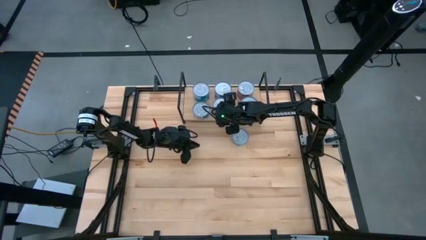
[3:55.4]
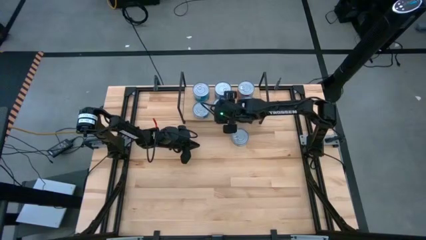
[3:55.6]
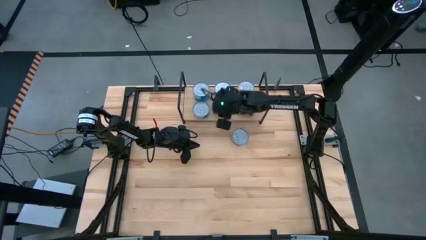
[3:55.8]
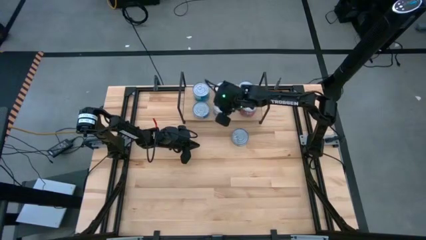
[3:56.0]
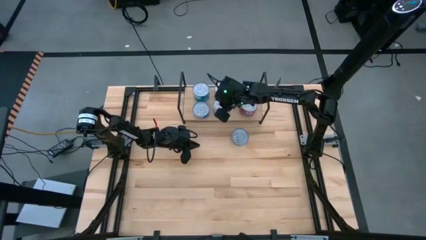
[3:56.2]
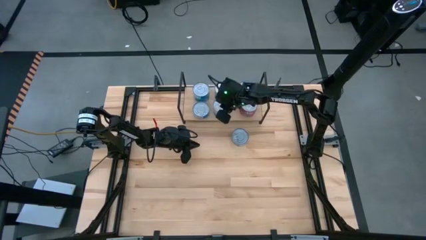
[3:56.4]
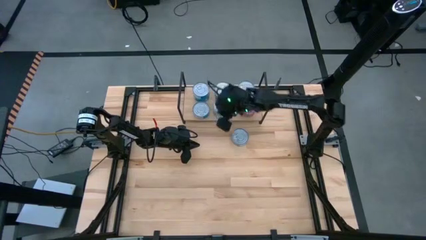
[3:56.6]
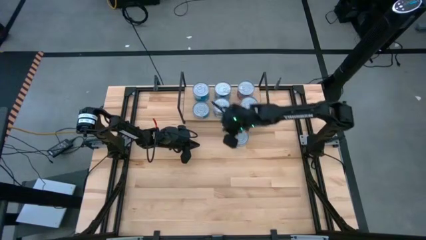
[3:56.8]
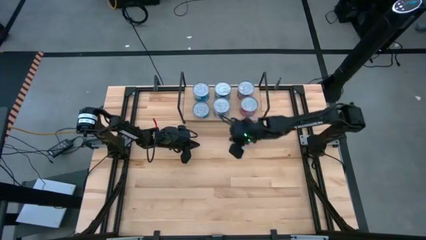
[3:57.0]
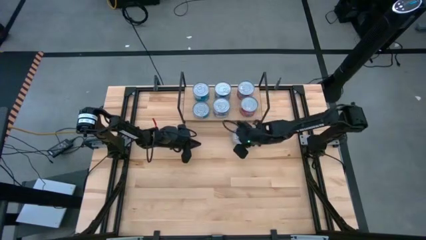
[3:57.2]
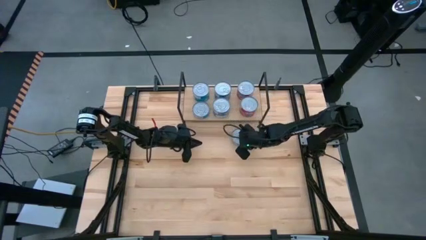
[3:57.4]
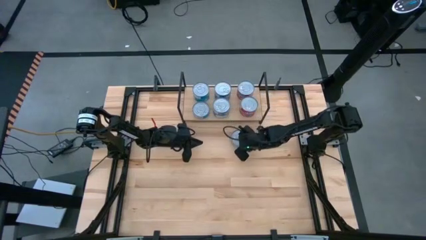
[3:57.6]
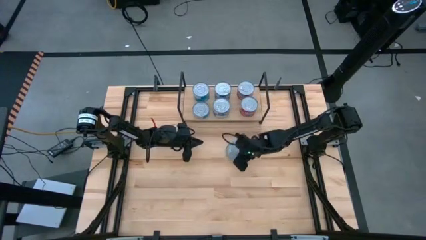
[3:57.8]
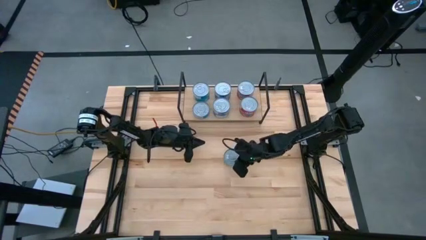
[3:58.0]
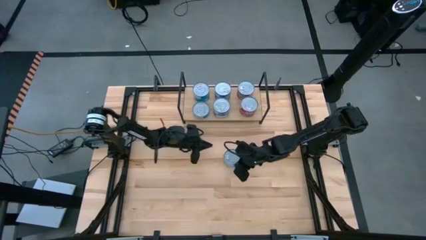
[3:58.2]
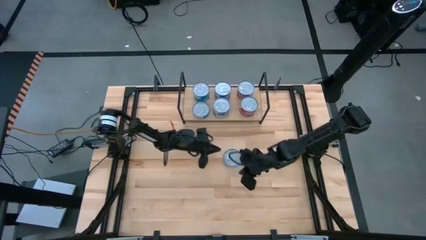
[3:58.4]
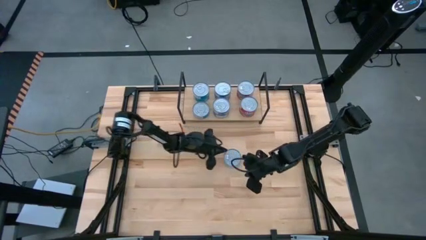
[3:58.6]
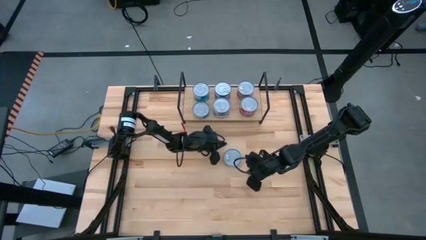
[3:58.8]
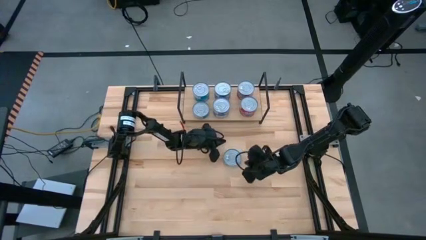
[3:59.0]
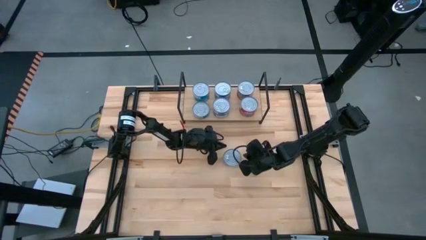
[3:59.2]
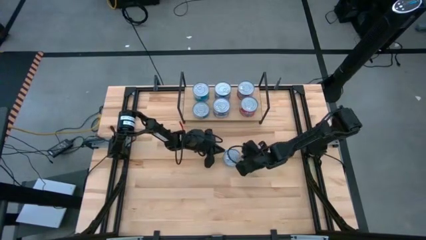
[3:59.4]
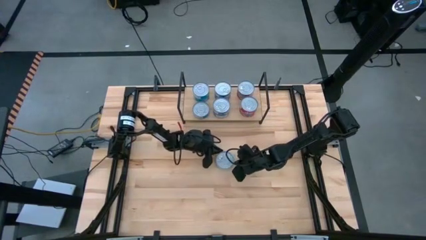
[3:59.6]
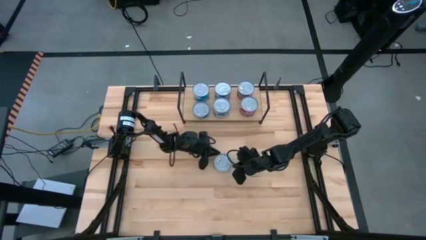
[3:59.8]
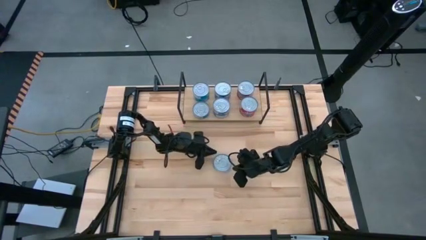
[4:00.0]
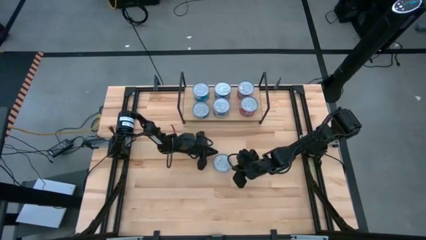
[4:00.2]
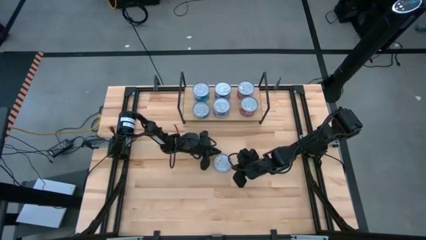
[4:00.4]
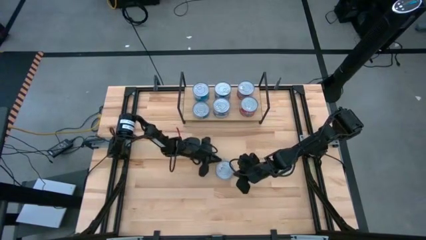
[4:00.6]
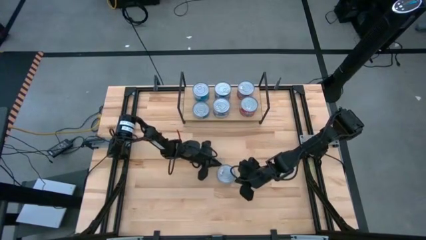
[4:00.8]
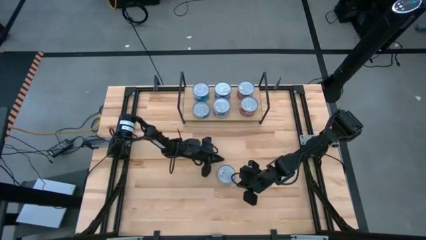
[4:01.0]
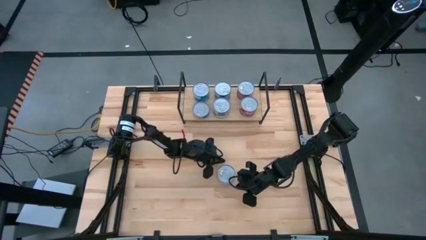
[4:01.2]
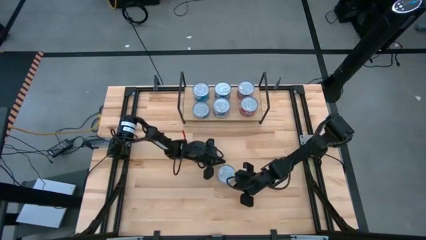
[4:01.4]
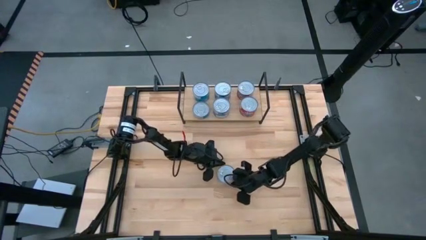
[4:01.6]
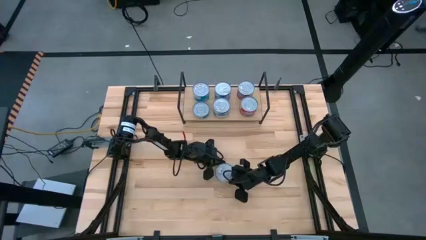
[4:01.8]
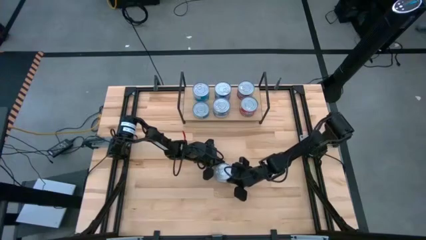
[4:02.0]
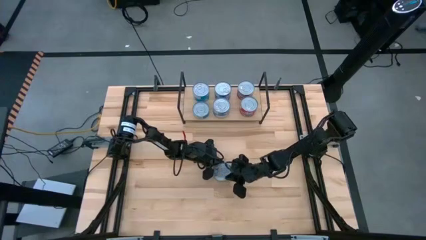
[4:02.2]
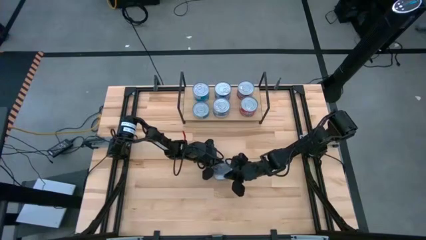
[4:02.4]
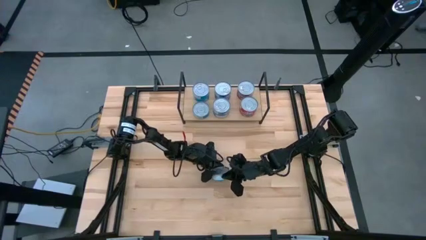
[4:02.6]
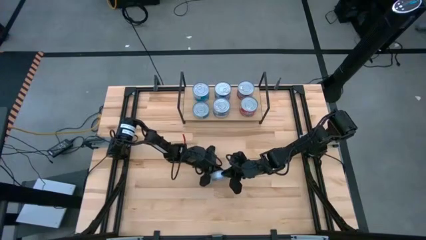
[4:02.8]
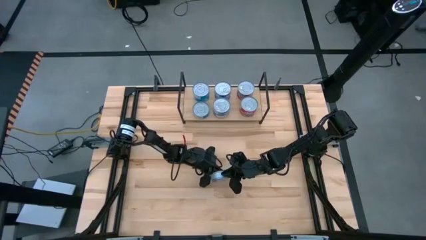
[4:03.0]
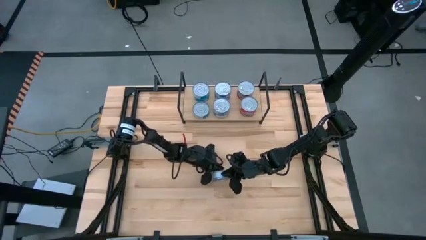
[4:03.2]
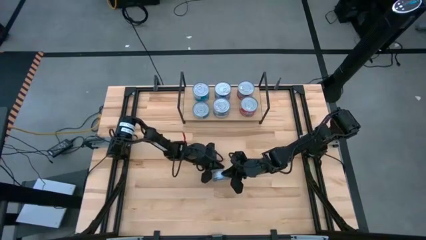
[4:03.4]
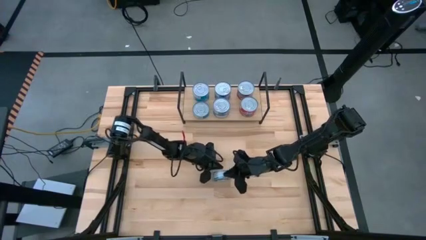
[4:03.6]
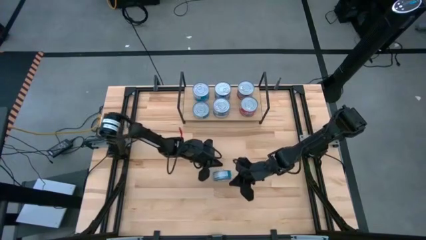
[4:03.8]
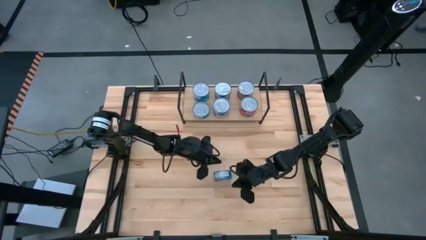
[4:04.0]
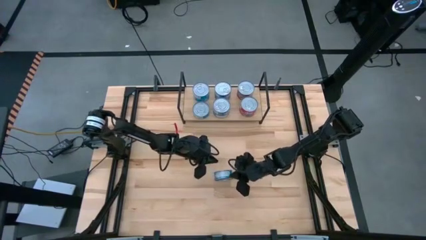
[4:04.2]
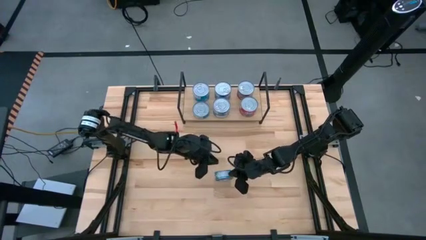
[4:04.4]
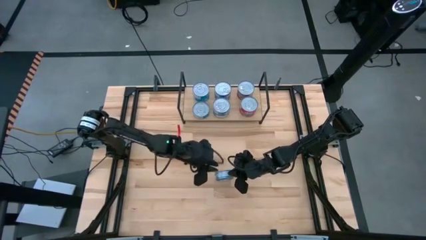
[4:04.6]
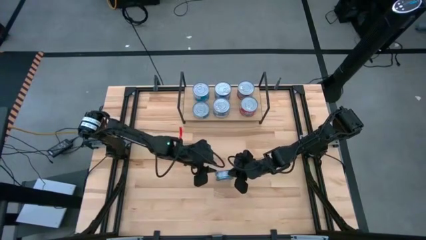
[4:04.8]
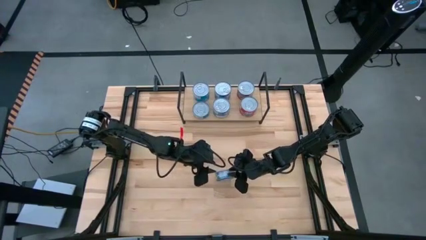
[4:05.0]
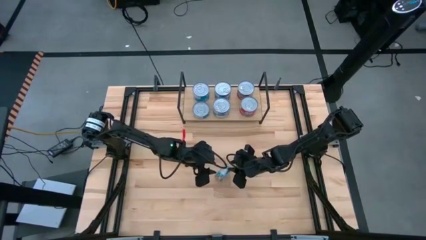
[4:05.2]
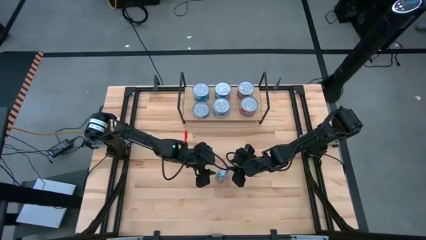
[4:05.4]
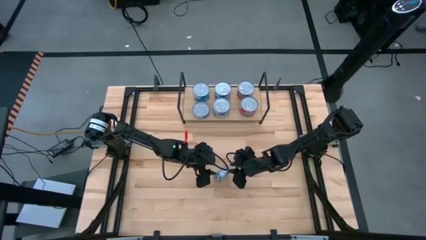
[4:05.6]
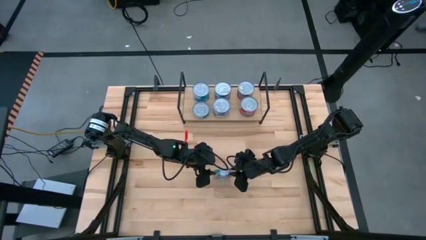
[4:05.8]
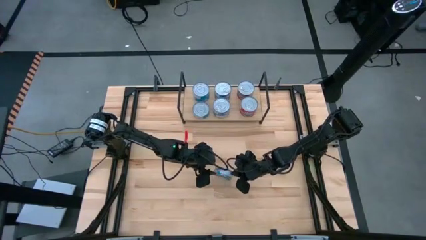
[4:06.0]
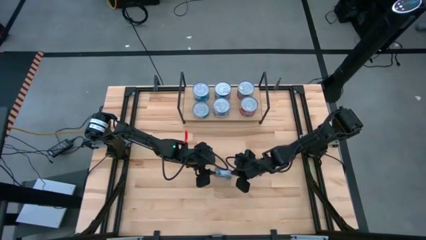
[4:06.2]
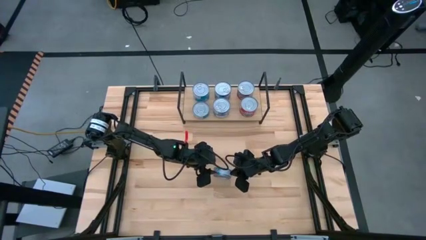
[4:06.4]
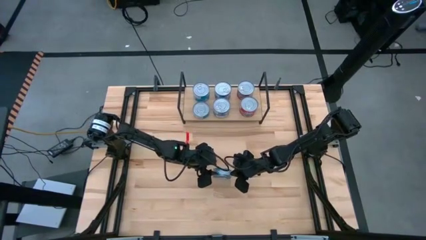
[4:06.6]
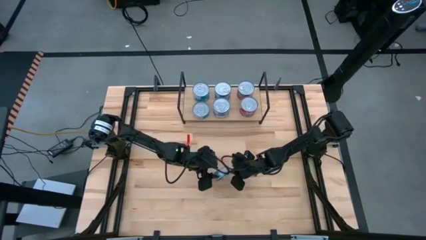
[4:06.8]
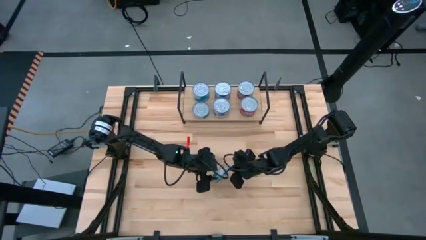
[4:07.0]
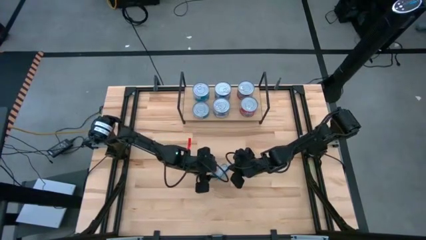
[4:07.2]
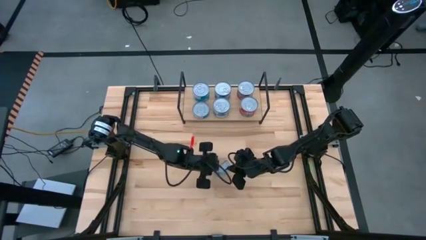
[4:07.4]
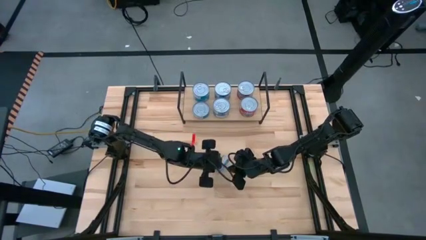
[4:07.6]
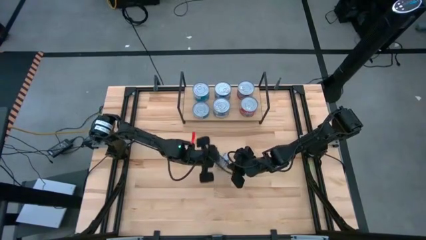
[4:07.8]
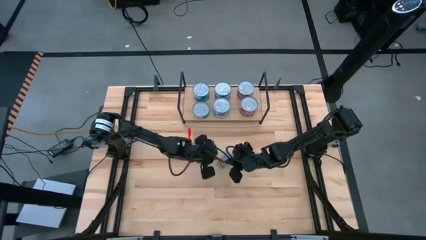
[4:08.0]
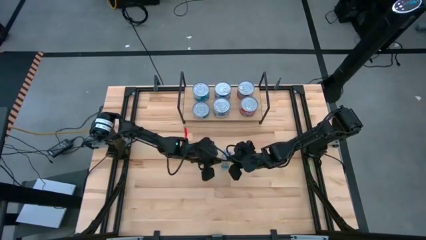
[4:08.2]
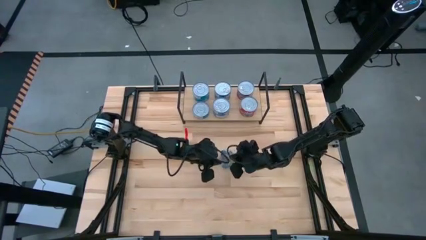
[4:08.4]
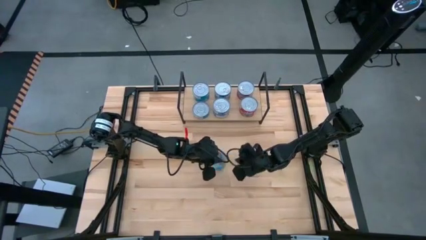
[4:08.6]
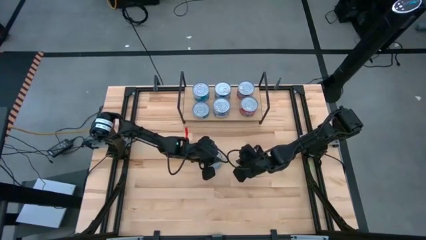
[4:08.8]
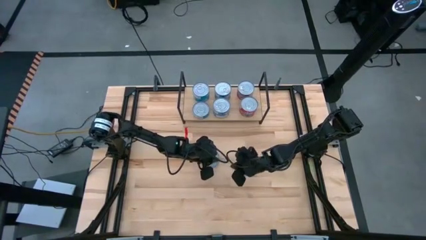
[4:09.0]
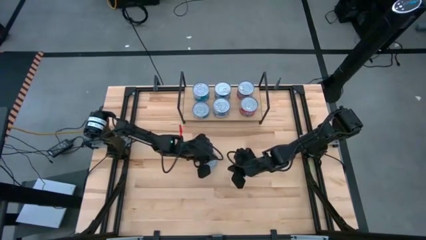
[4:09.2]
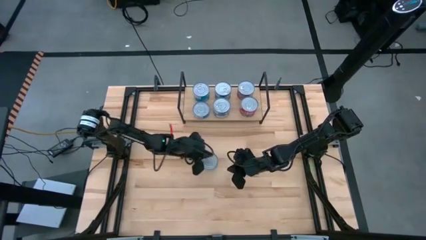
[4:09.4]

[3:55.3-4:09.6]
Task: Stack canned seafood by type on shelf
Stack the yellow-blue tuna can on top of the yellow-blue tuna can on the shelf

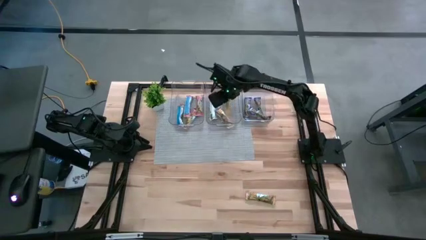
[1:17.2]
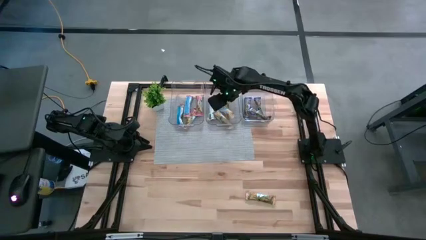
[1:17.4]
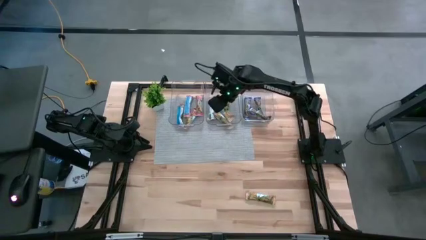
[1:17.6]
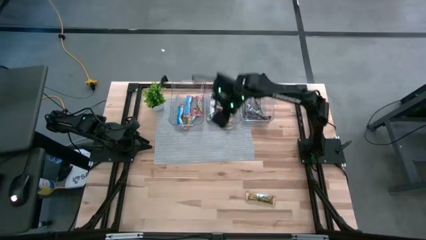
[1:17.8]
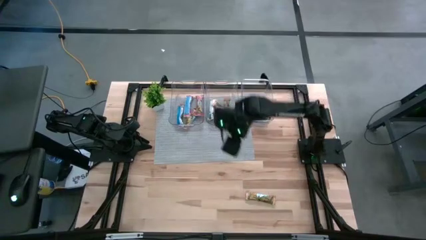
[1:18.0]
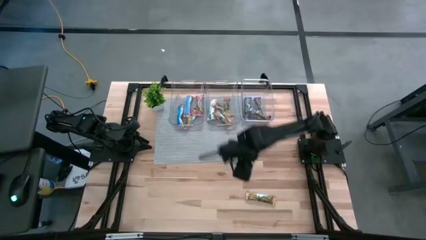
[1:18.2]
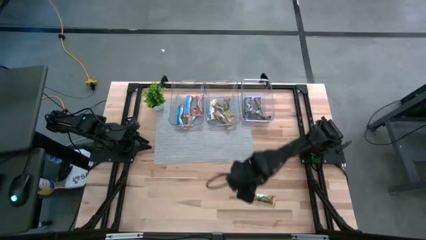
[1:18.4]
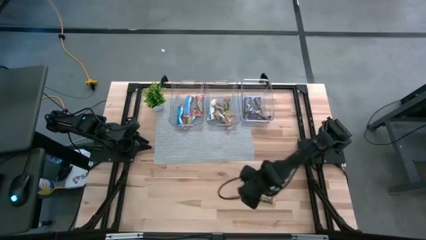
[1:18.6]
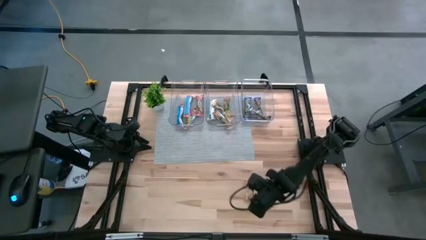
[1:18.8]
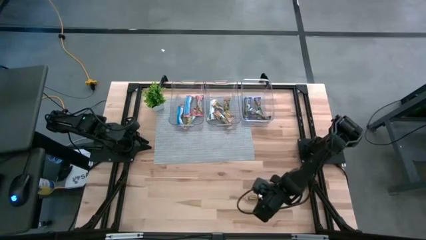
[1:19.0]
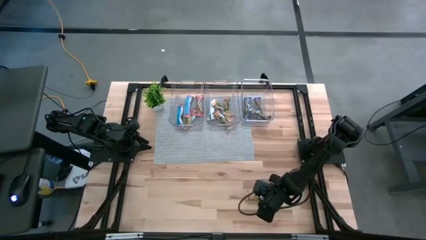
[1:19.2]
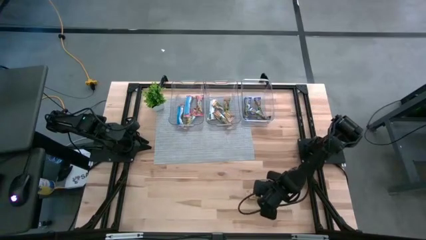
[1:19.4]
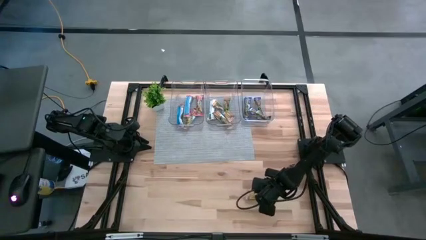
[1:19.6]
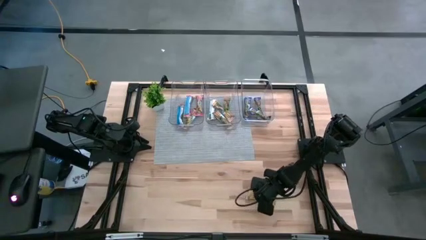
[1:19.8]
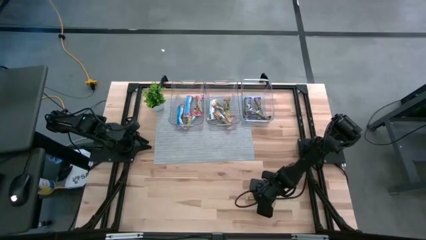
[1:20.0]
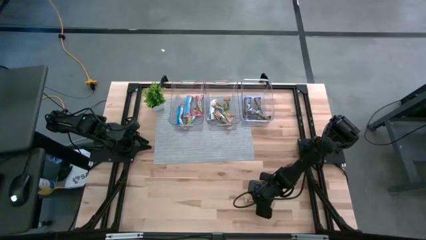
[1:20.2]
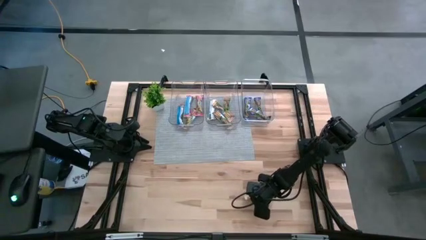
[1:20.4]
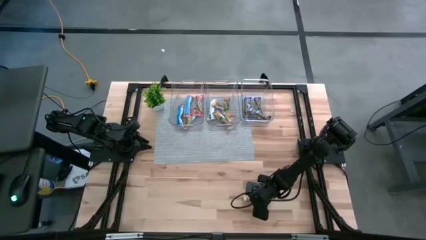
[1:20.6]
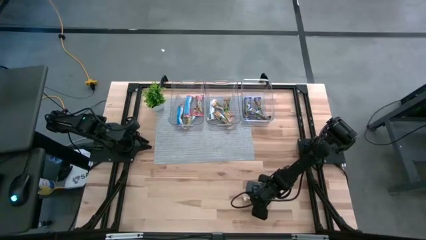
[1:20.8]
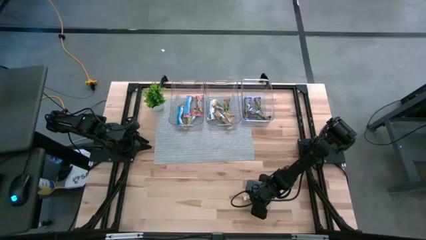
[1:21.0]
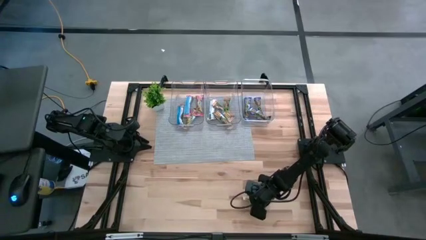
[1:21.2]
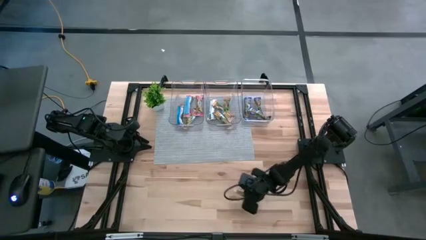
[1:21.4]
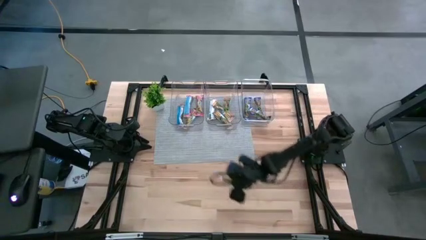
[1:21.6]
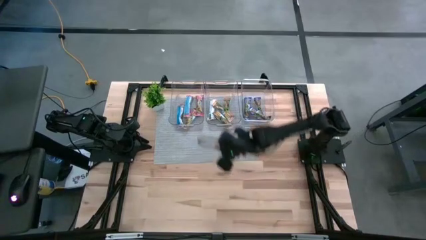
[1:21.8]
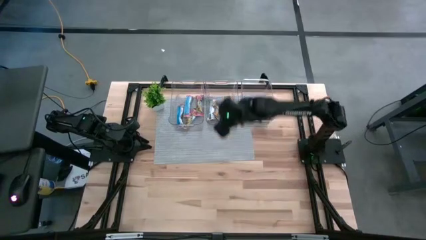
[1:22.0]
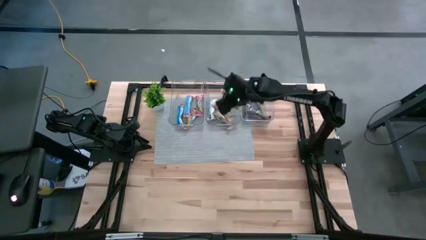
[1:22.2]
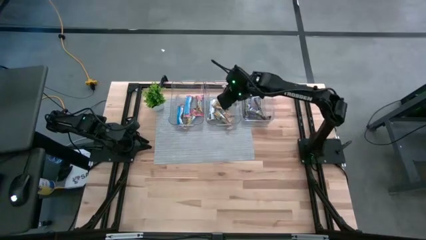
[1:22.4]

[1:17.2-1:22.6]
Task: Pick and place Granola Bars by type
Put the yellow granola bar into the middle transparent bin
